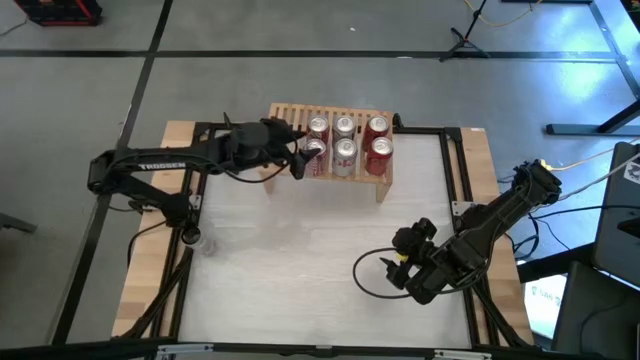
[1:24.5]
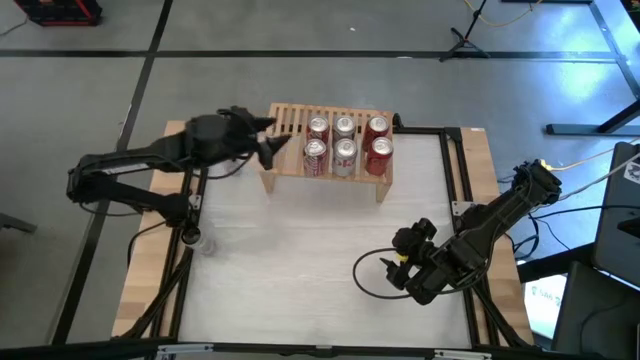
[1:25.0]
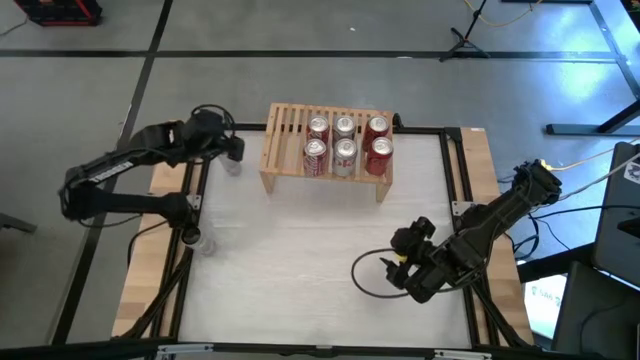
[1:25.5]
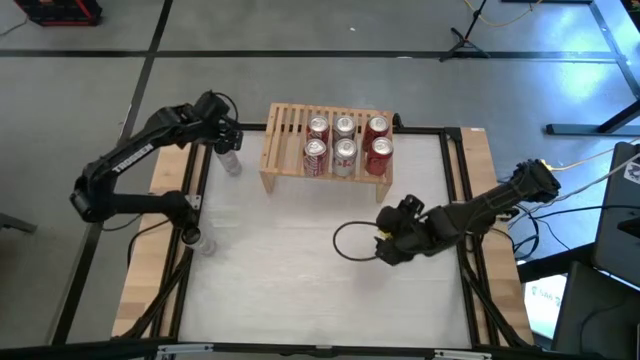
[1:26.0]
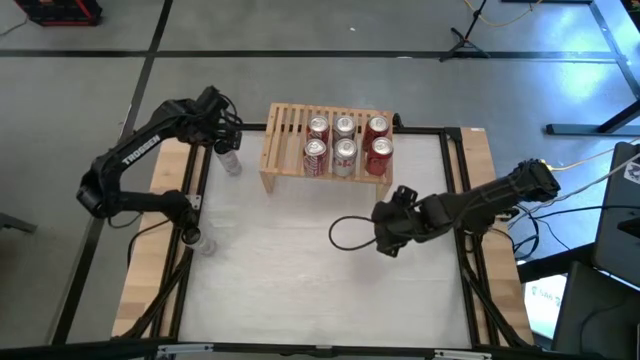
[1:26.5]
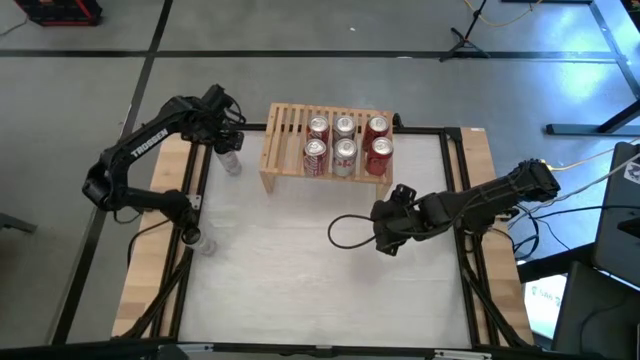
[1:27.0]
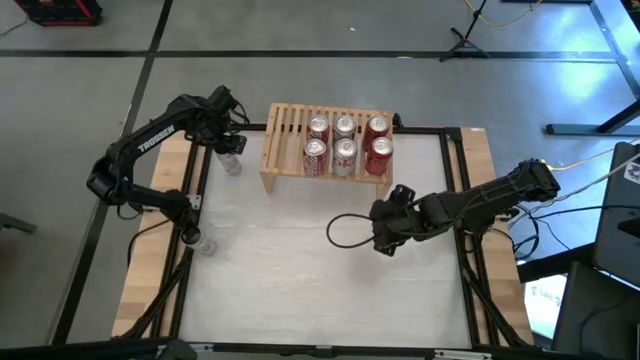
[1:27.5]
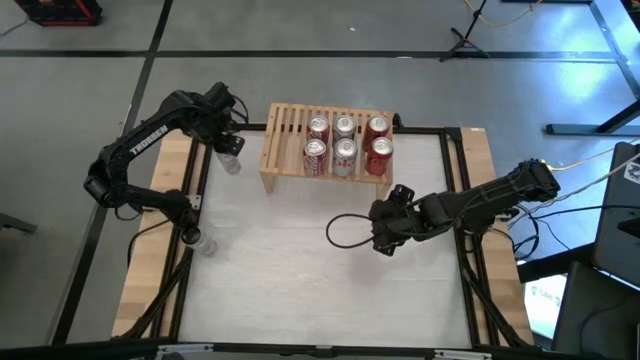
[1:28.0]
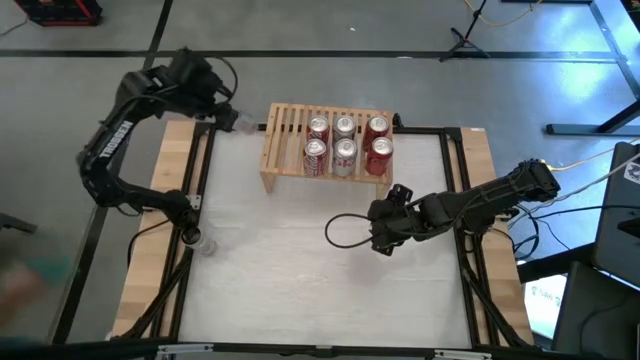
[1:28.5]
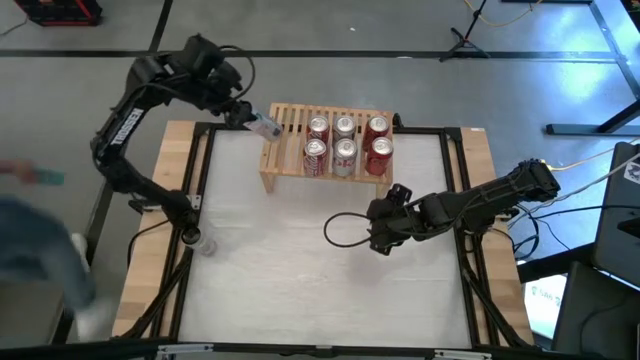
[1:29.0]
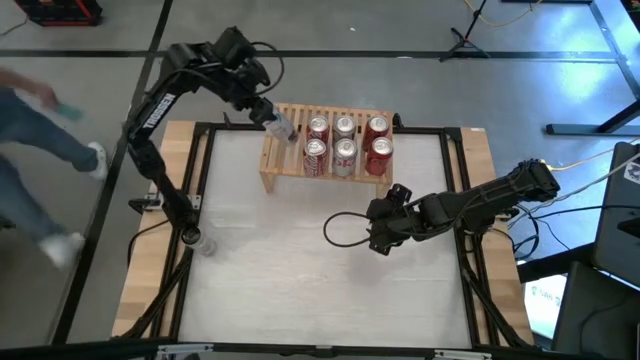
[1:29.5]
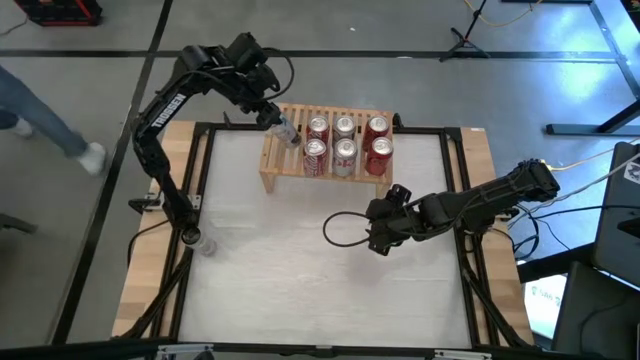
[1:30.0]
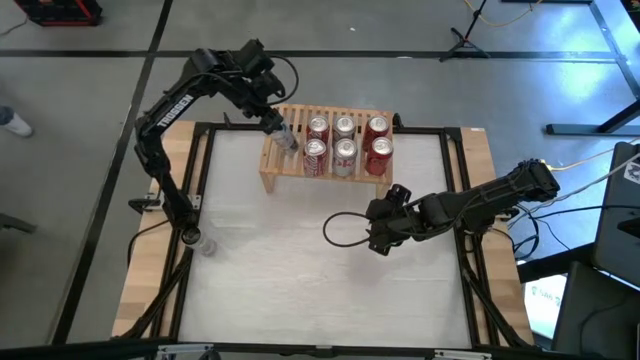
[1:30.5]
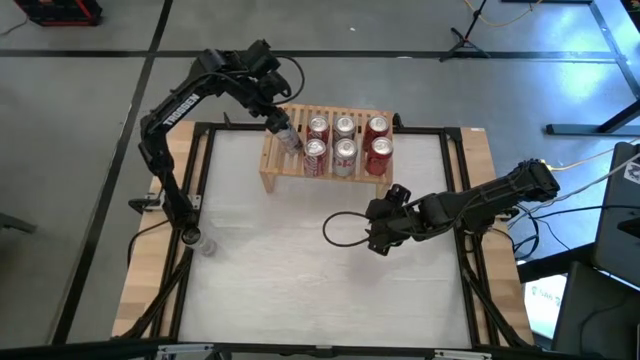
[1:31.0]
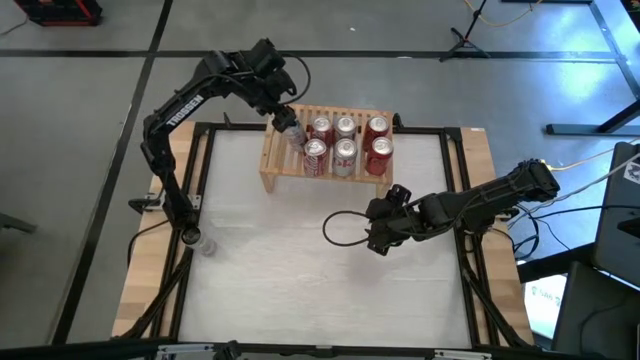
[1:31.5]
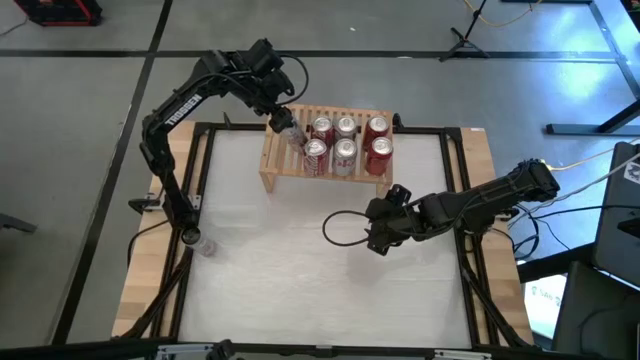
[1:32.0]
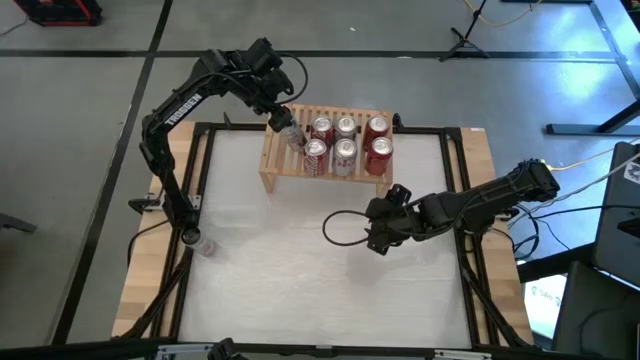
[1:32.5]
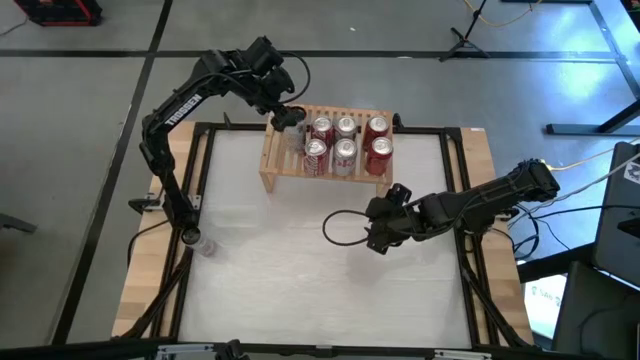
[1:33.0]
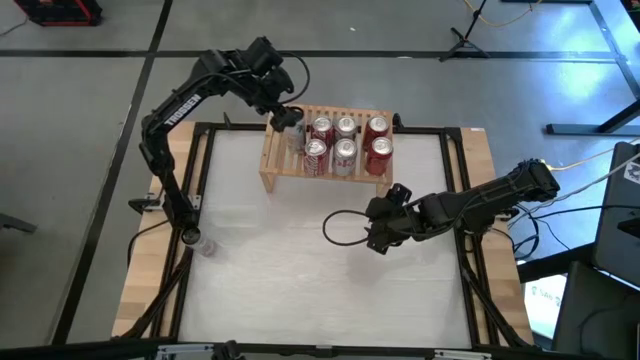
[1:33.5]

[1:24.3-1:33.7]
Task: Place canned beverage on shelf
Put the top white soda can on the shelf

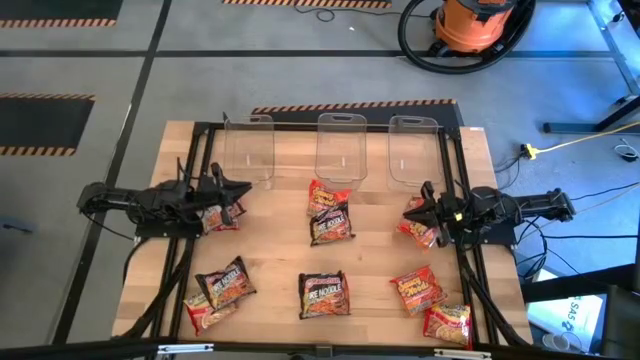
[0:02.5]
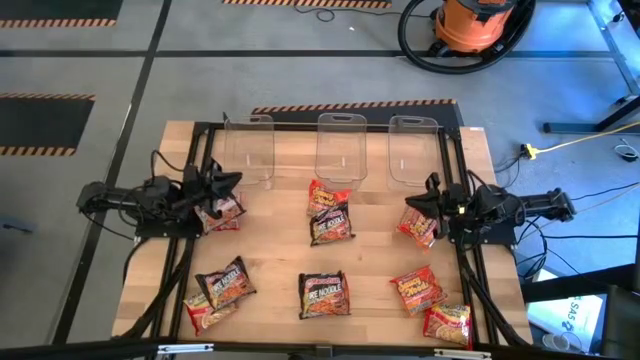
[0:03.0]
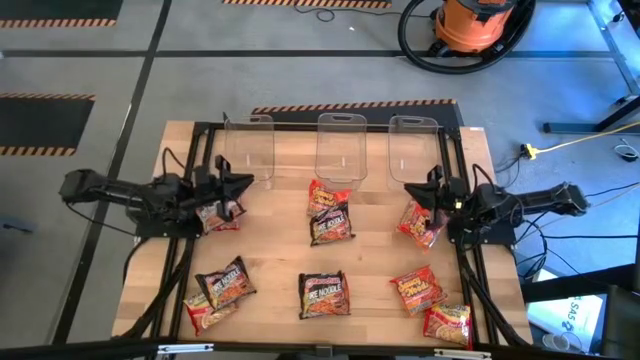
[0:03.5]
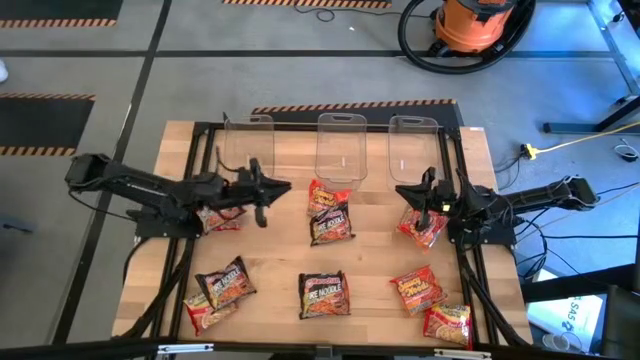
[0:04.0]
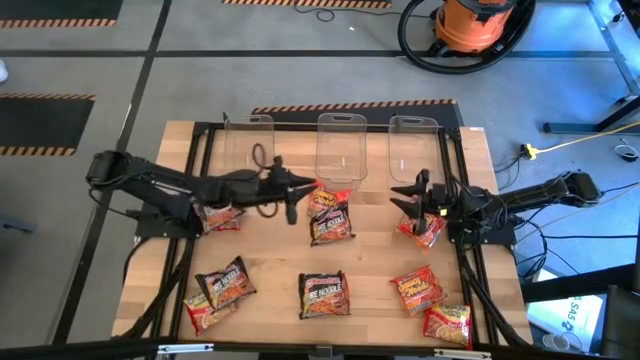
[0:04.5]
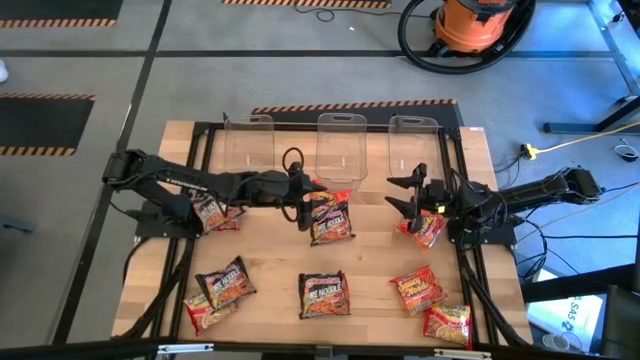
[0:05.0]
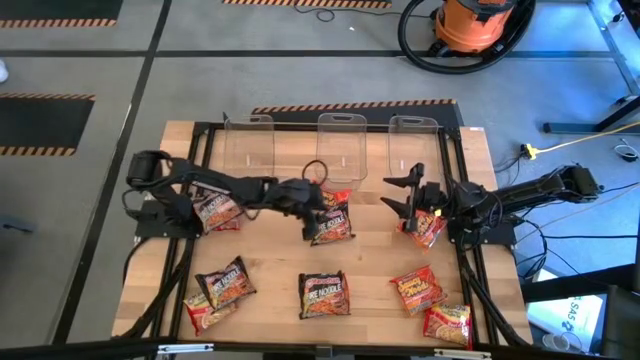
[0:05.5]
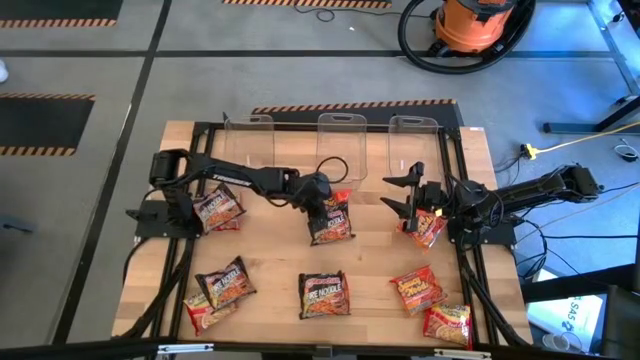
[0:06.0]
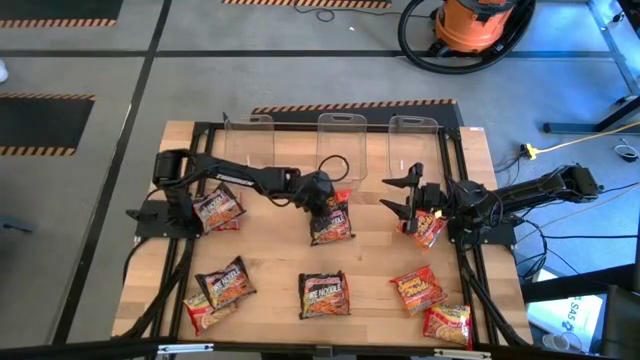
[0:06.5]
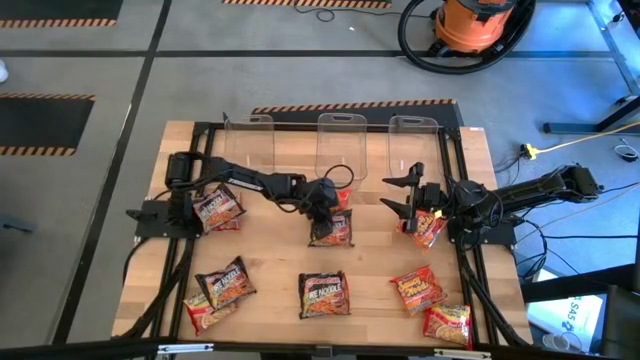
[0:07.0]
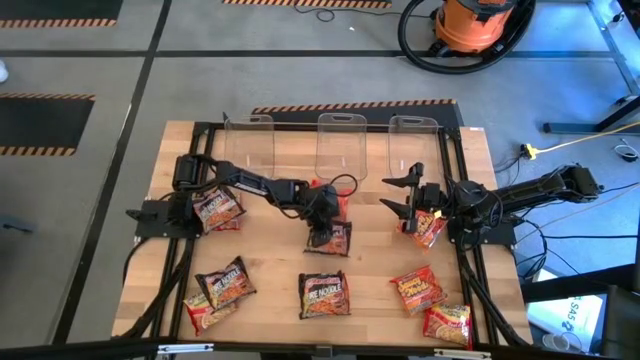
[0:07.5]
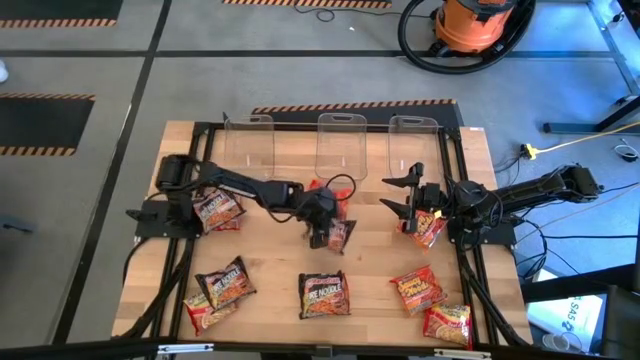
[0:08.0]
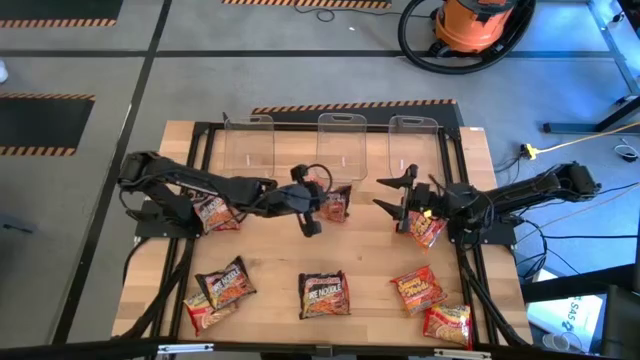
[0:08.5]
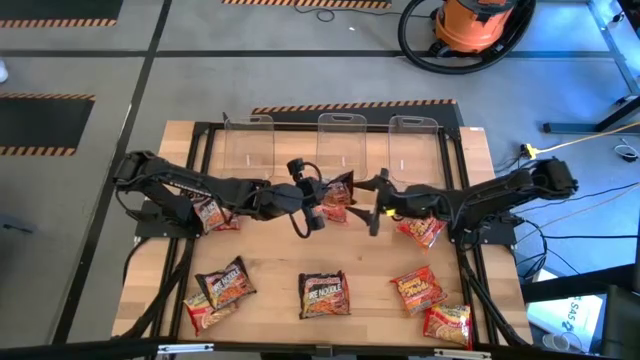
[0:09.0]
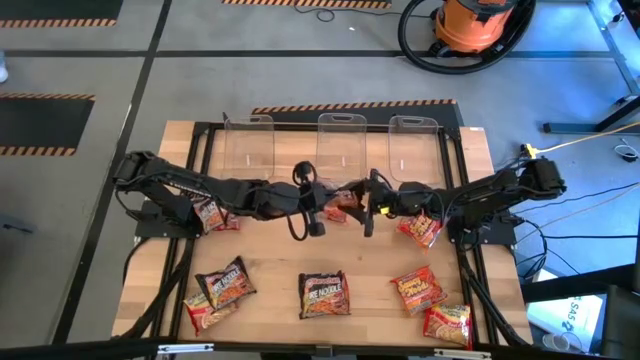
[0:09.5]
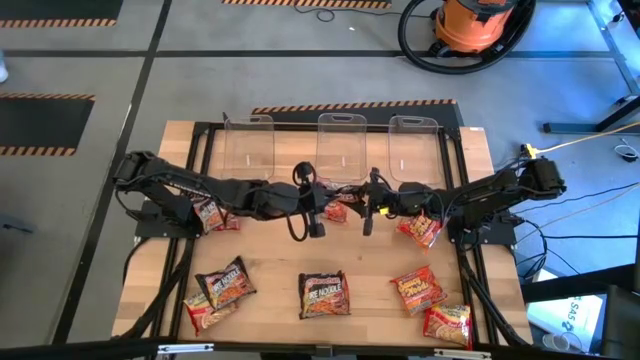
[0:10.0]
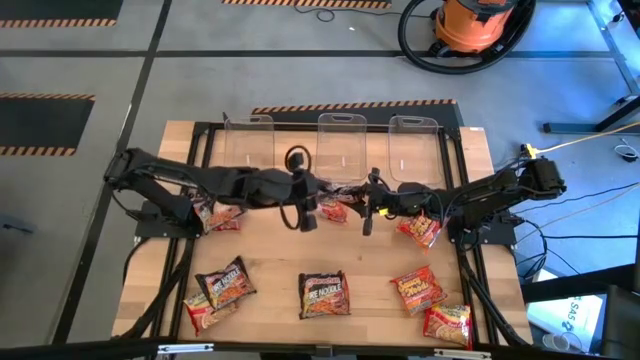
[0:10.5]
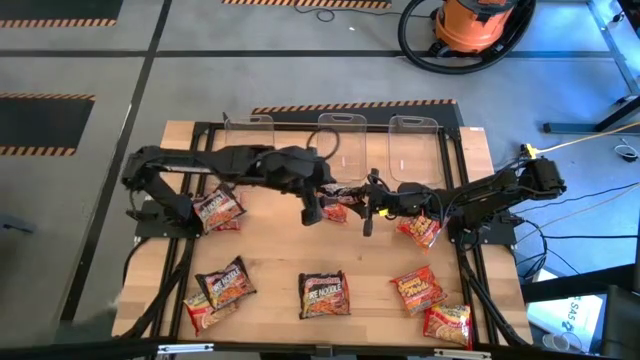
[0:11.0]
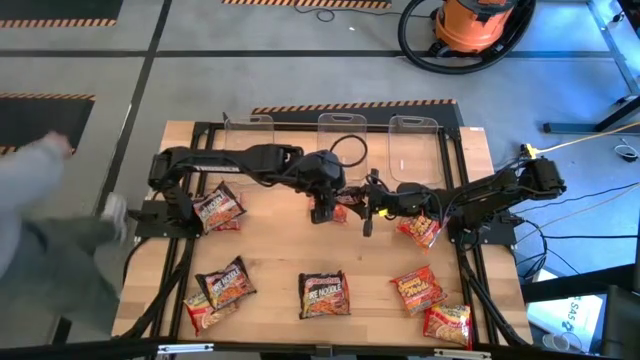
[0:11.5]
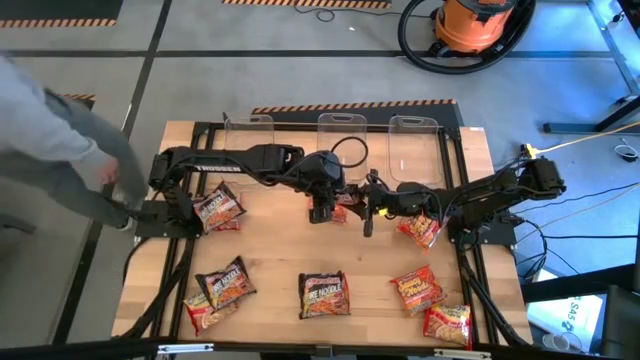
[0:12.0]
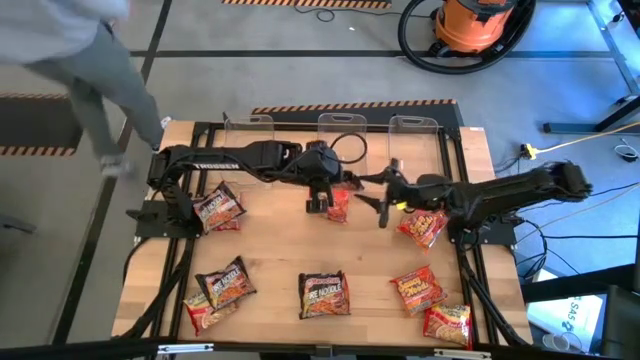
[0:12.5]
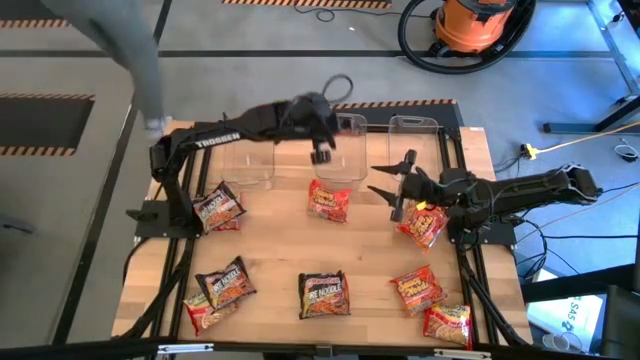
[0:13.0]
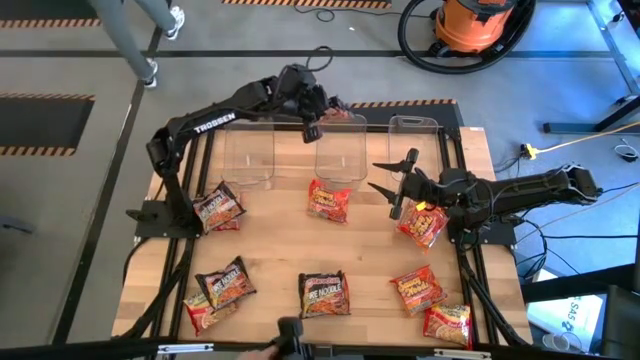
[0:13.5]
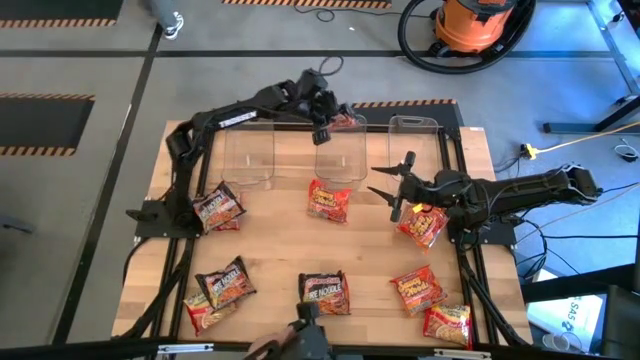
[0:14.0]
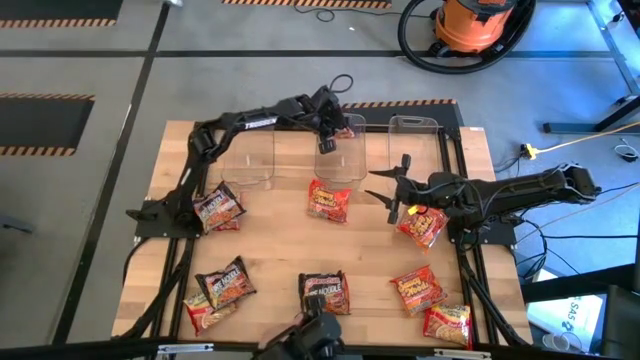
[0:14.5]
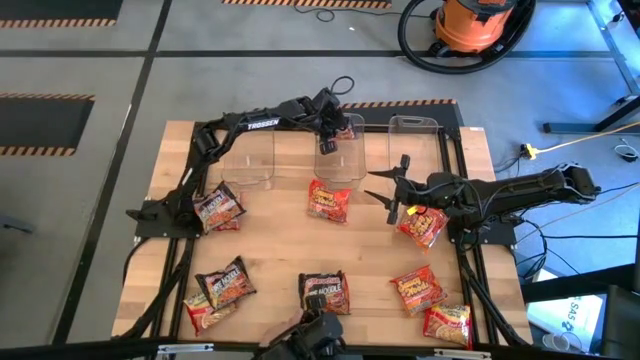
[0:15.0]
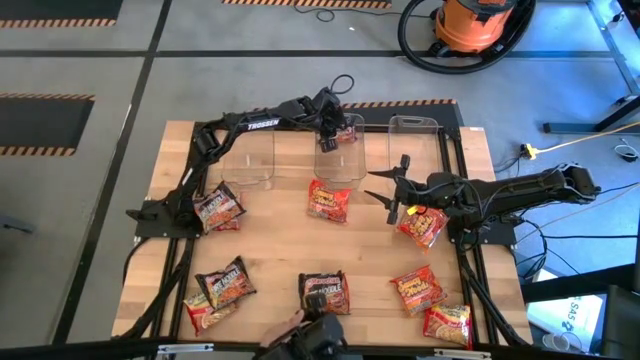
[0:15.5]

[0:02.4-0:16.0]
Task: Sort Maruchan noodles
Put the black noodle pack into the middle transparent bin
